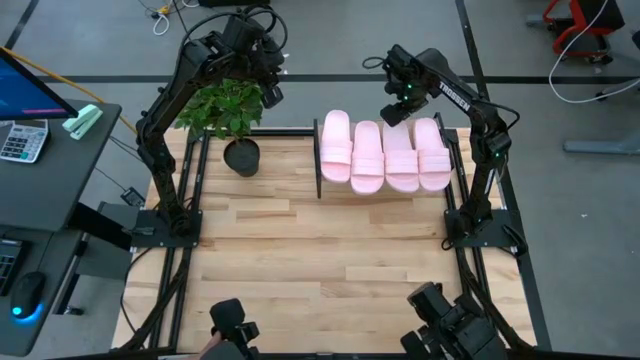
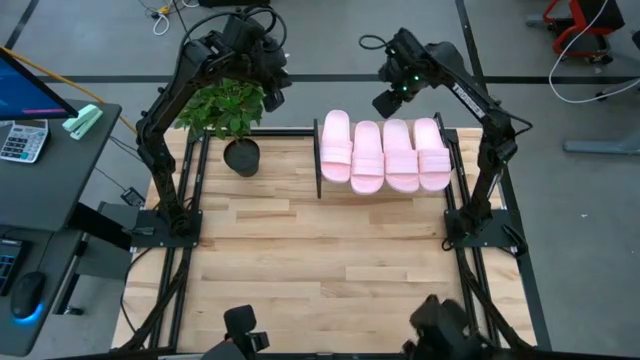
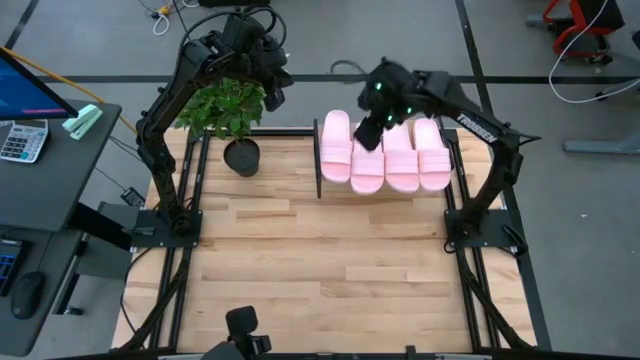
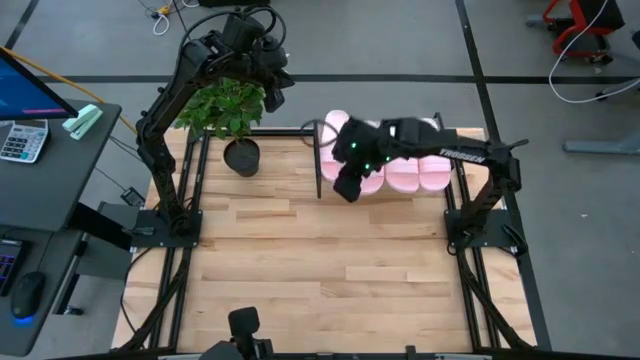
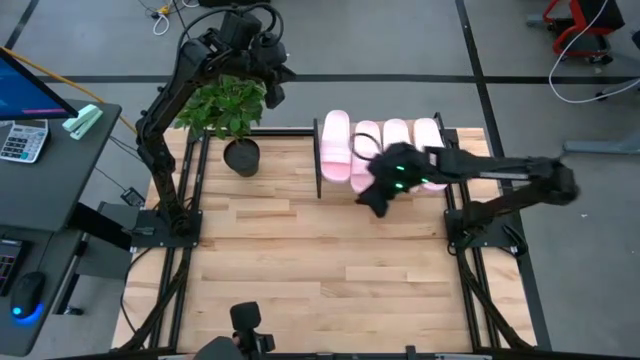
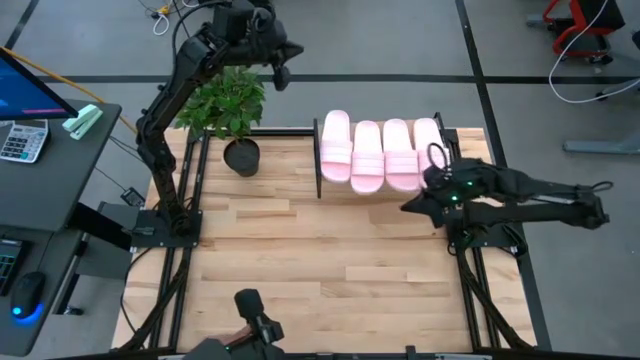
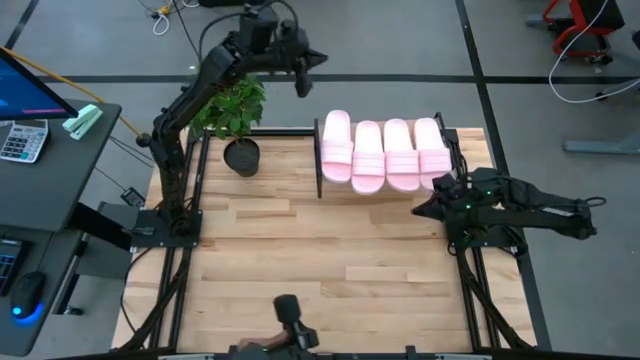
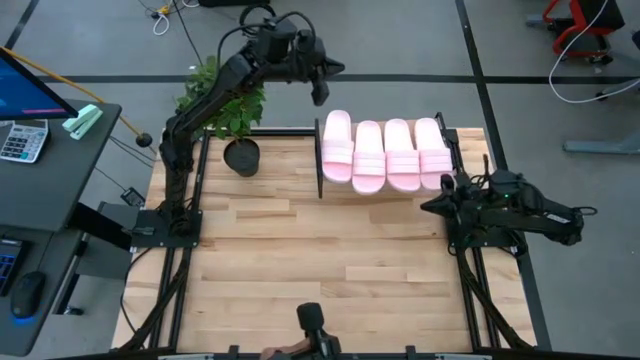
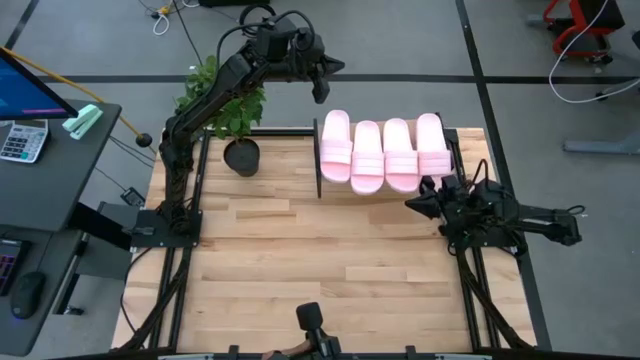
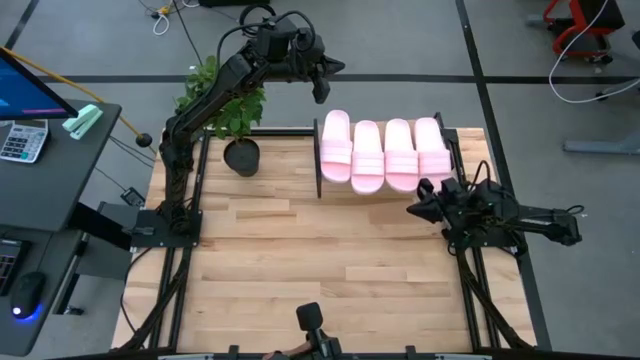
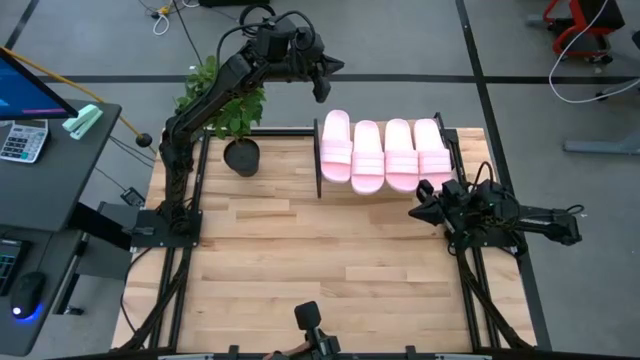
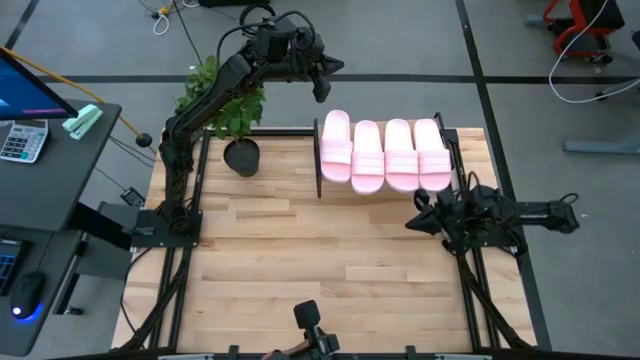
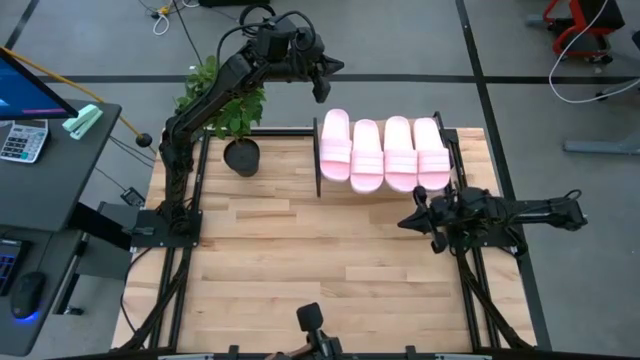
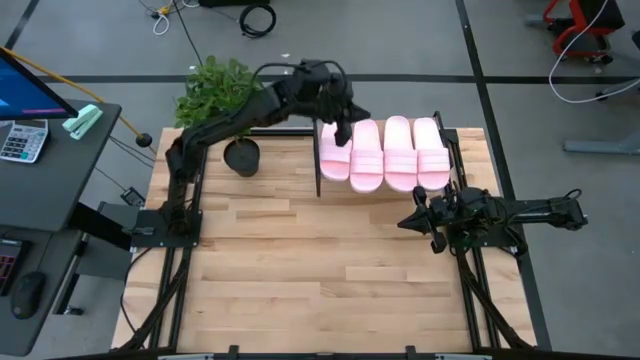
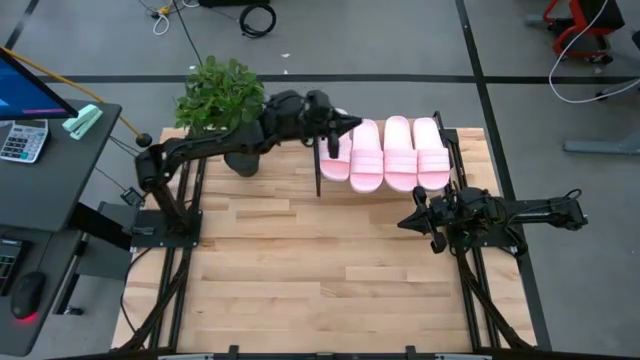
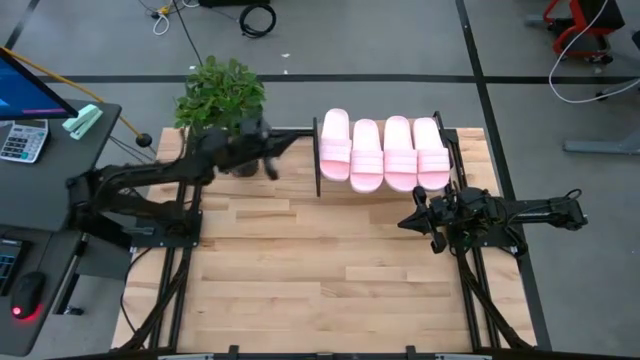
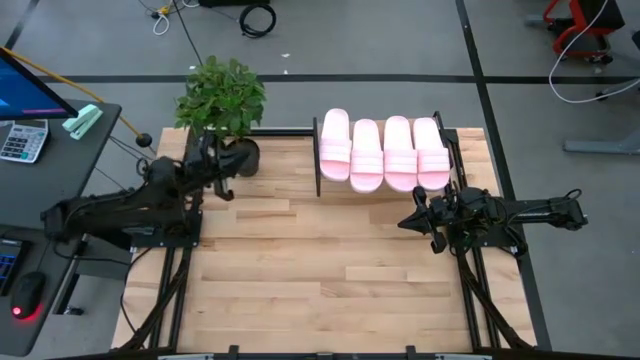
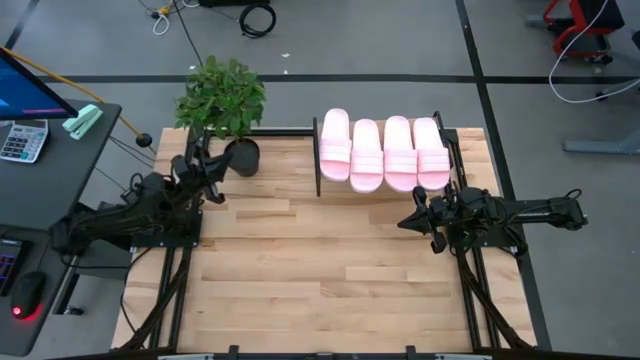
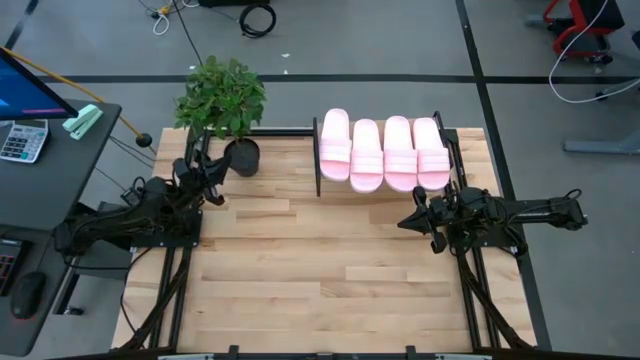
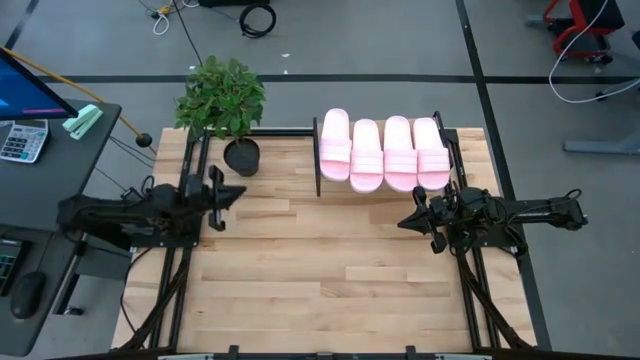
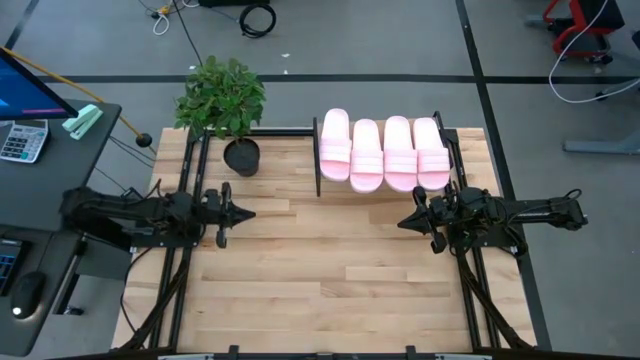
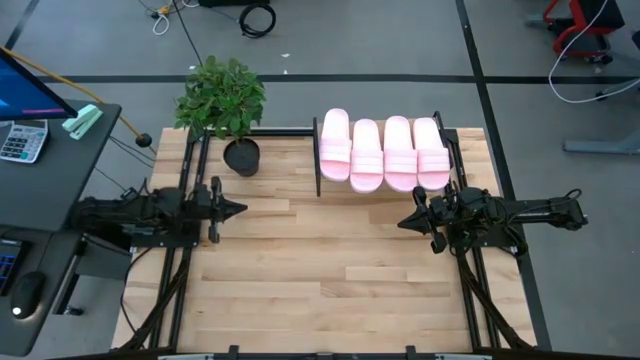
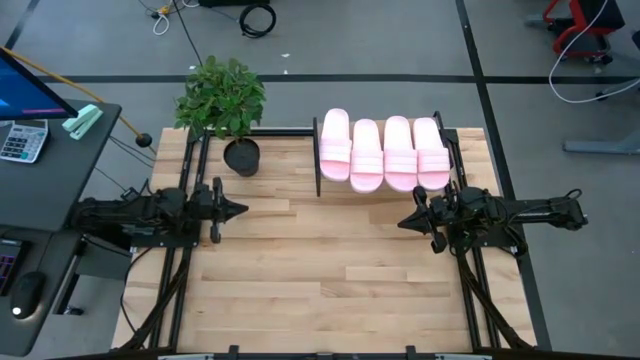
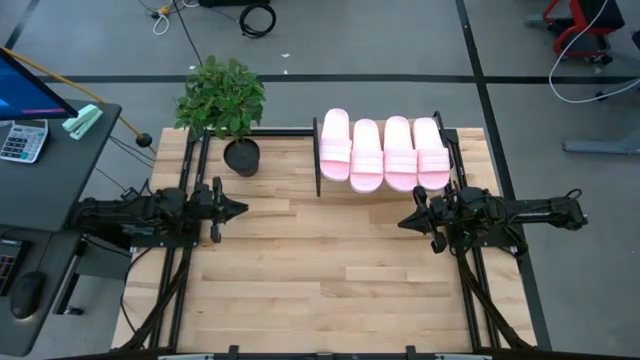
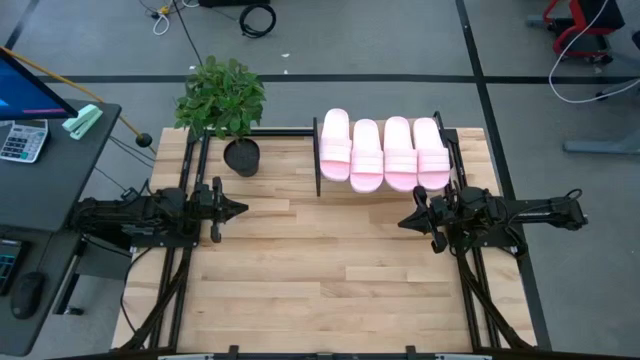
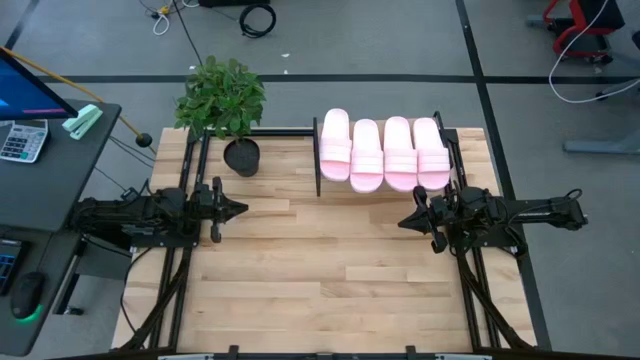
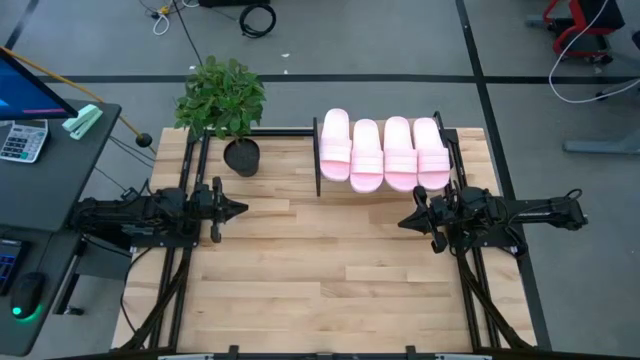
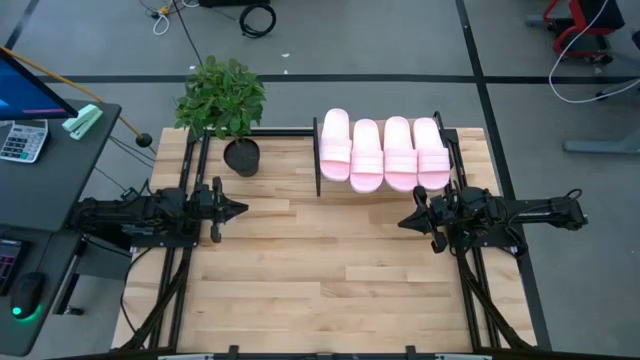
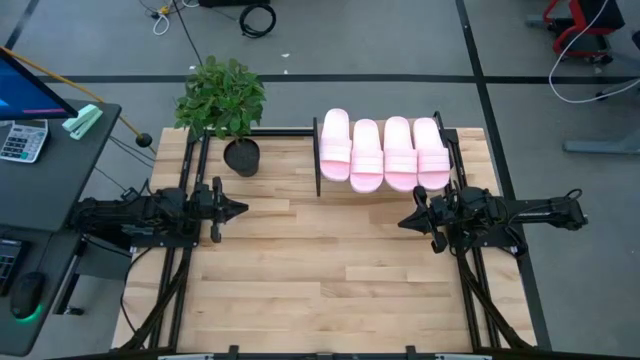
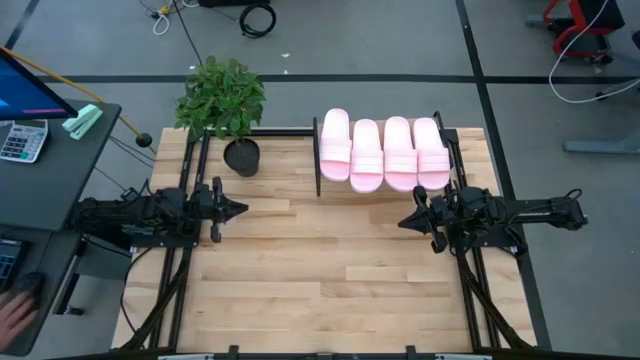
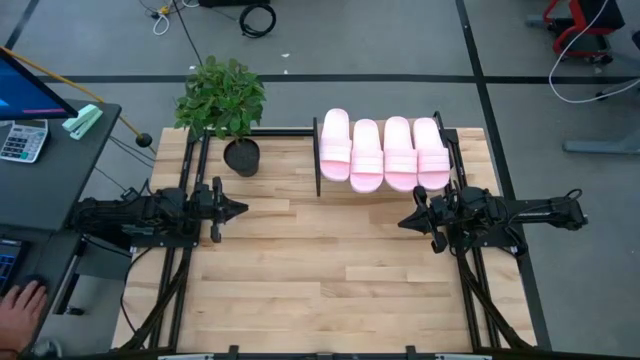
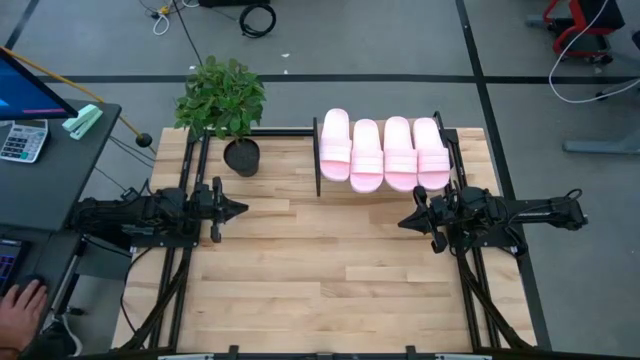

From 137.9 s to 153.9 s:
Task: Pick and place slides into the shelf
Return to Home Position

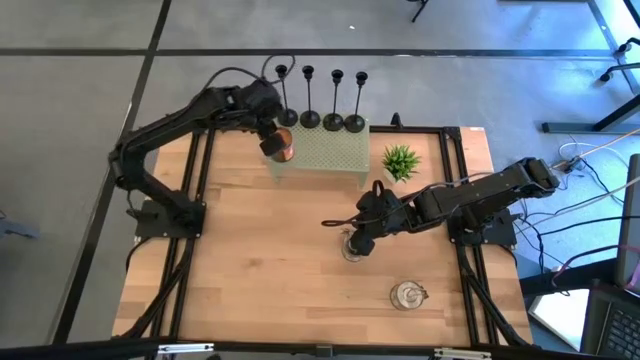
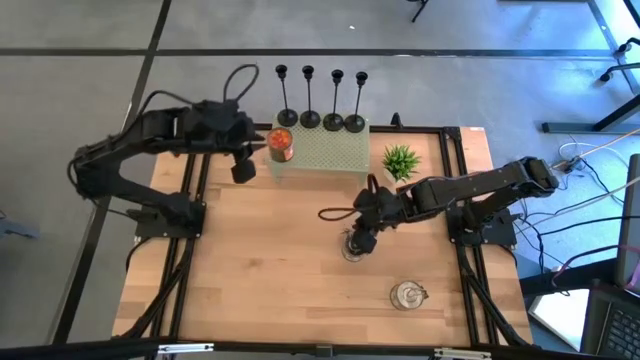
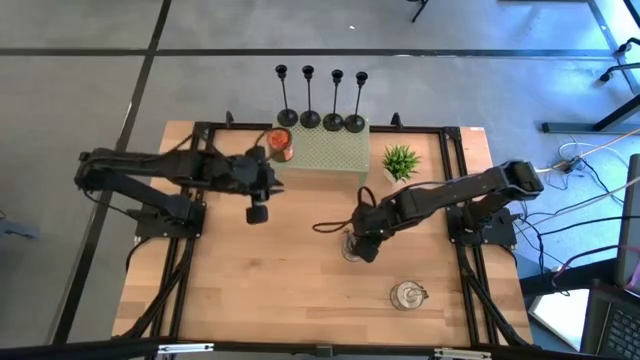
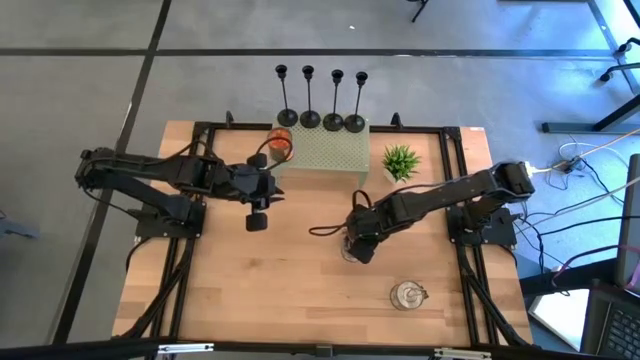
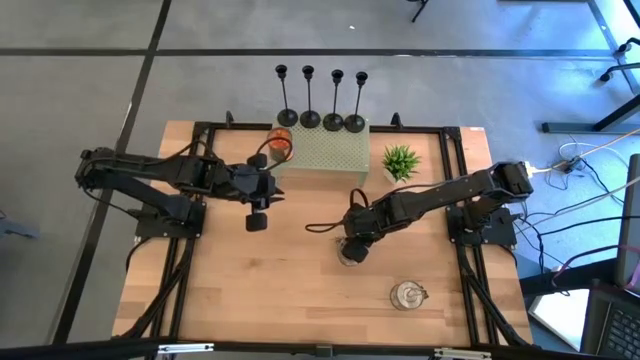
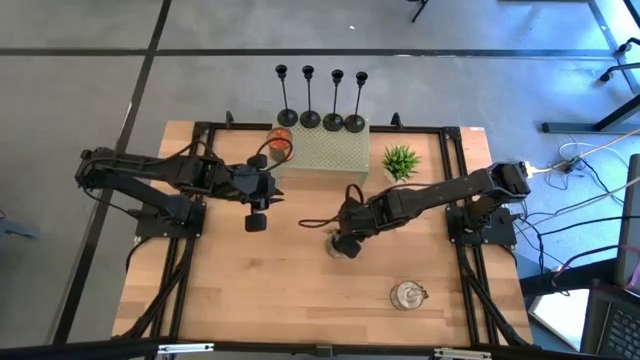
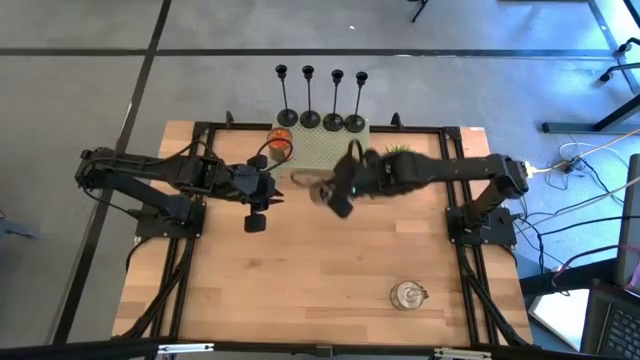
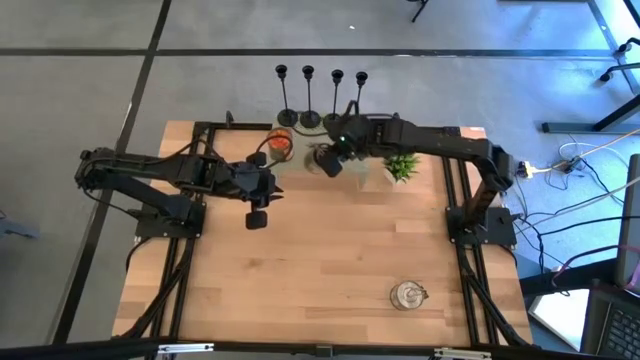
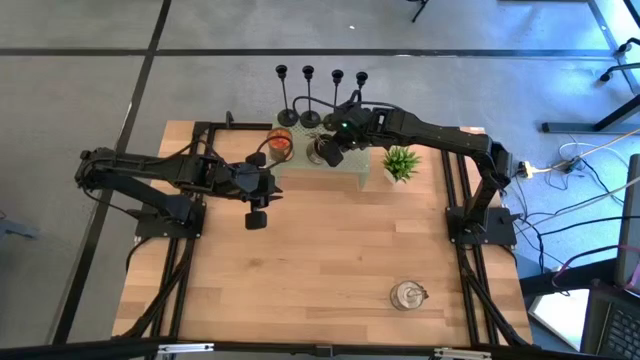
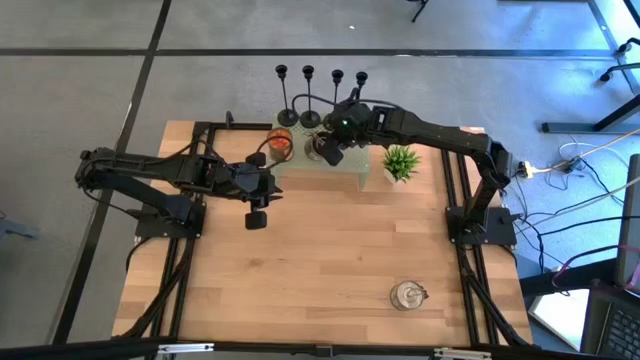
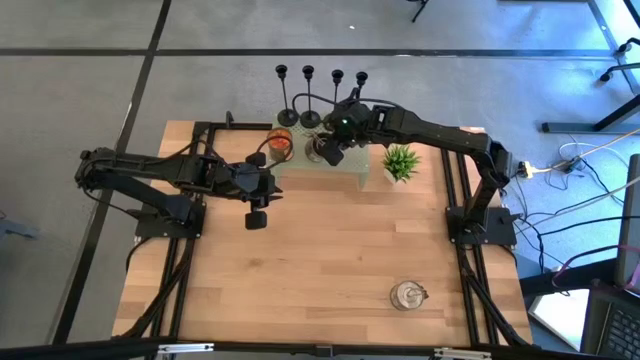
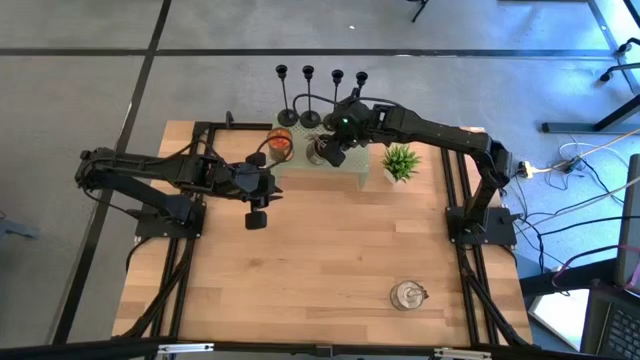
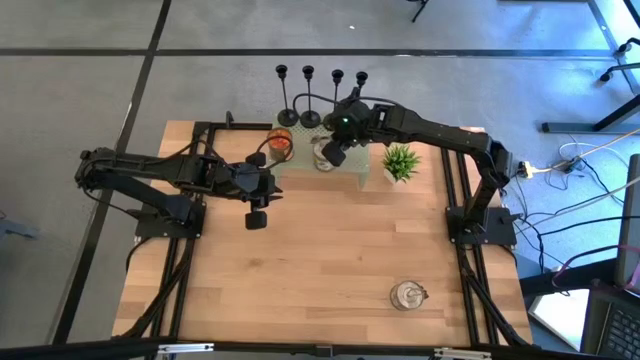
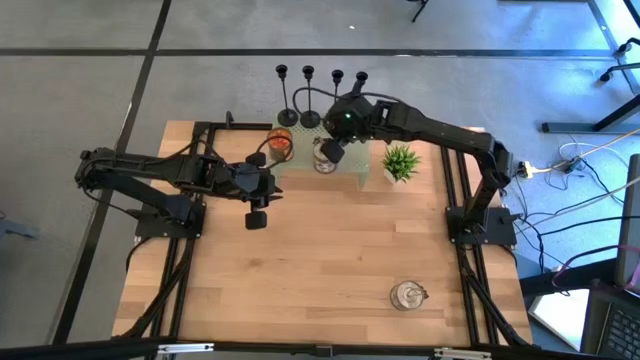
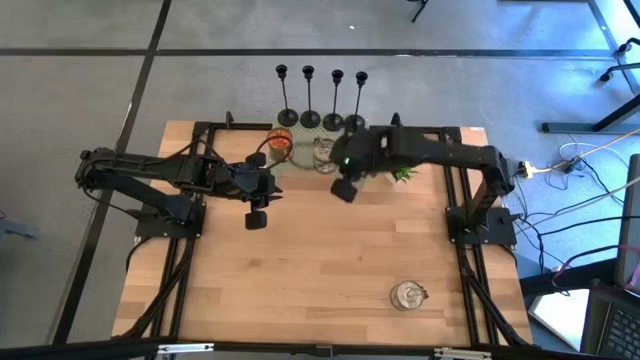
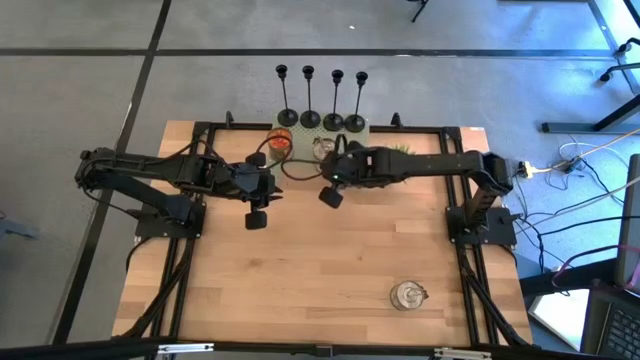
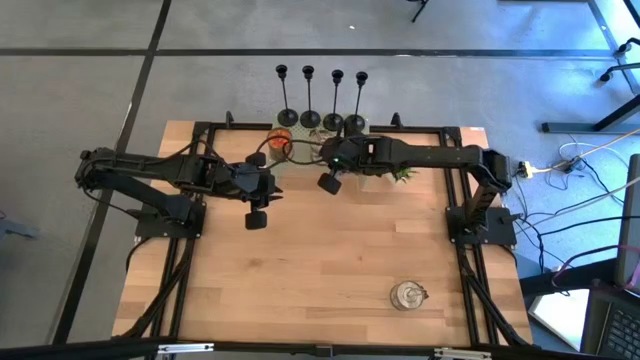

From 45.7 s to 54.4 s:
Task: Pick & Place candle stick holders
Put the top candle on the shelf aligned with the other candle
